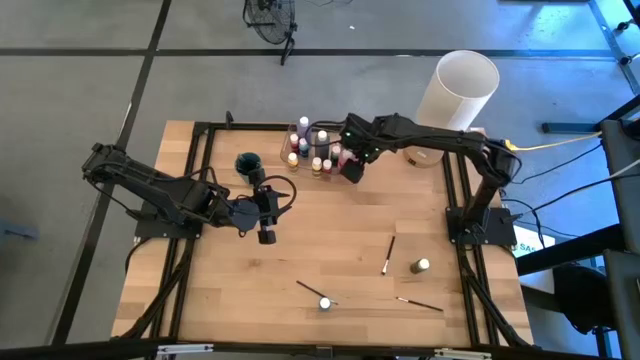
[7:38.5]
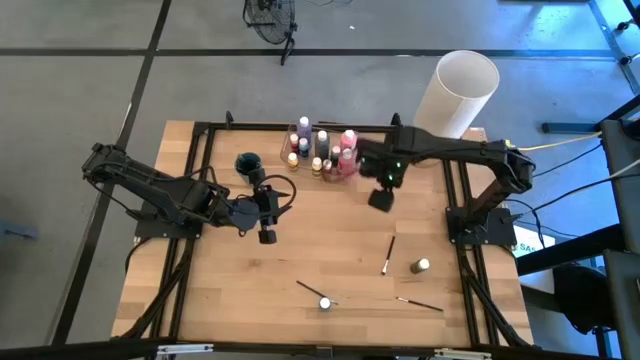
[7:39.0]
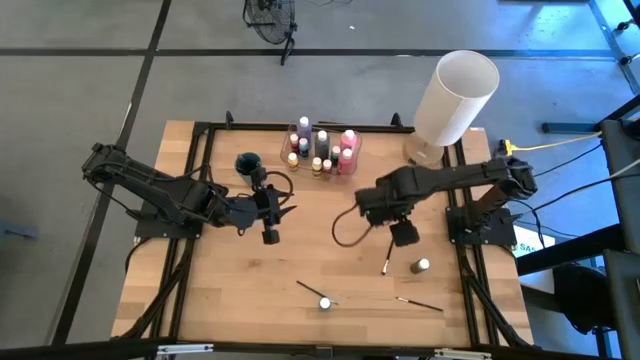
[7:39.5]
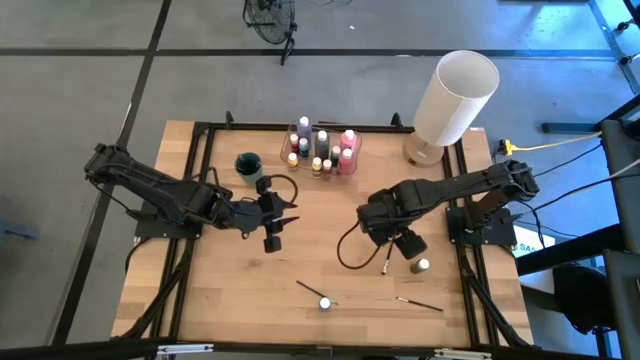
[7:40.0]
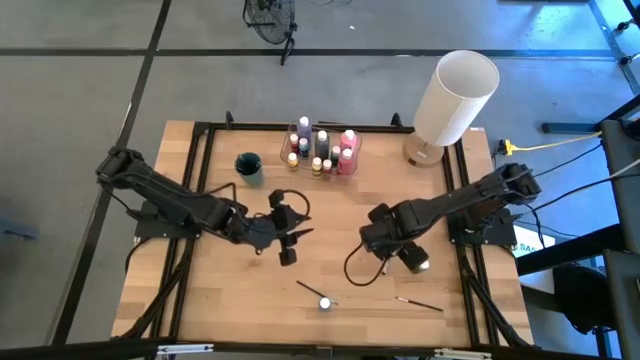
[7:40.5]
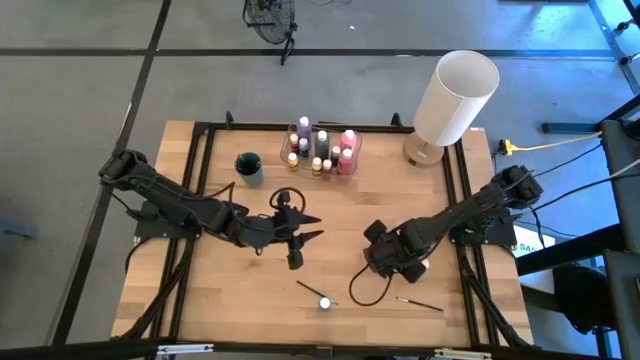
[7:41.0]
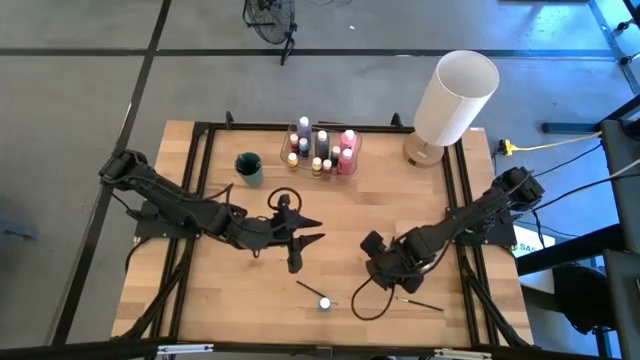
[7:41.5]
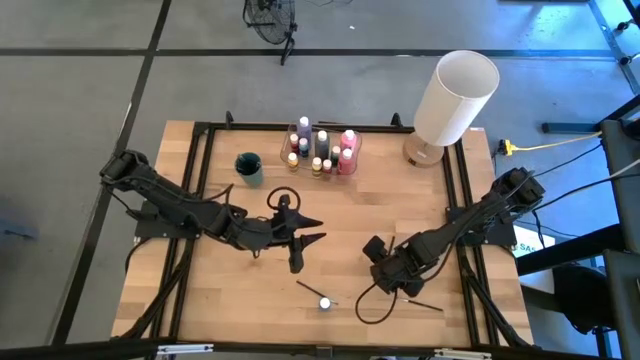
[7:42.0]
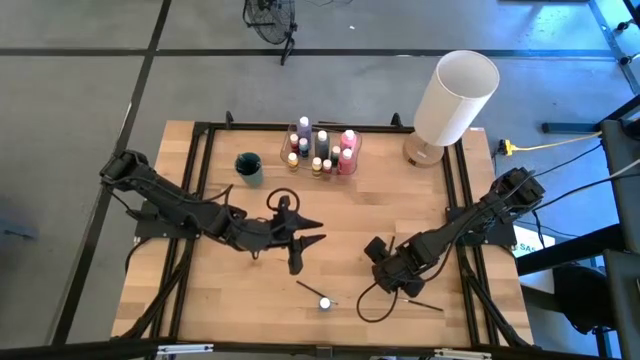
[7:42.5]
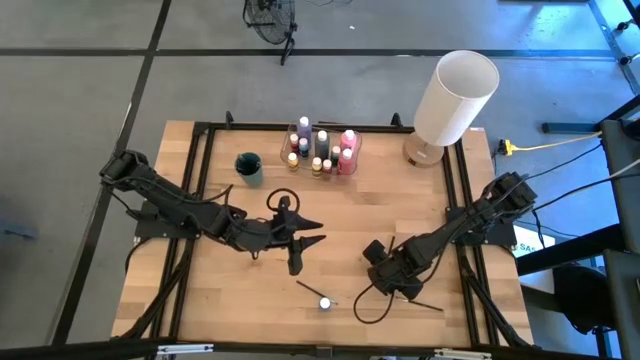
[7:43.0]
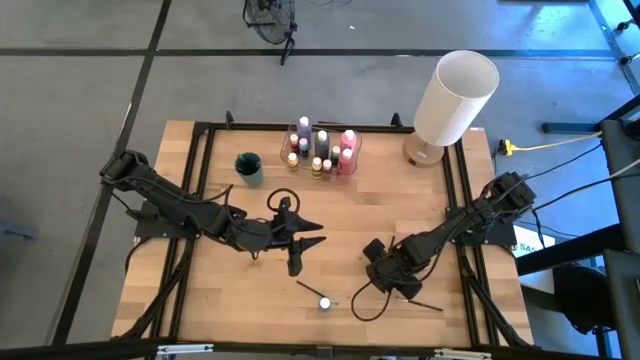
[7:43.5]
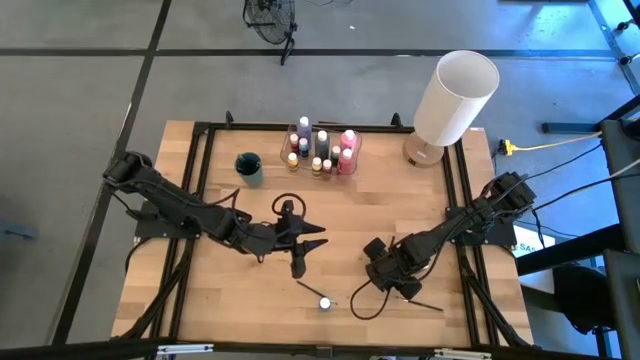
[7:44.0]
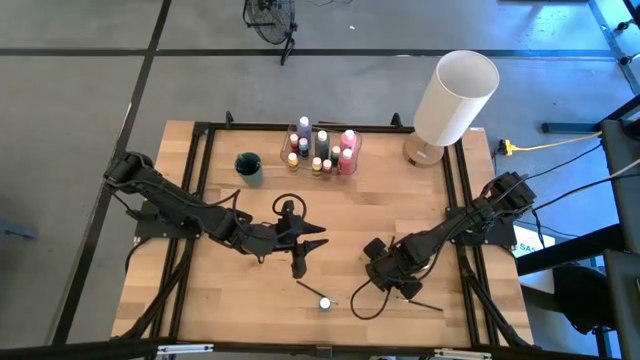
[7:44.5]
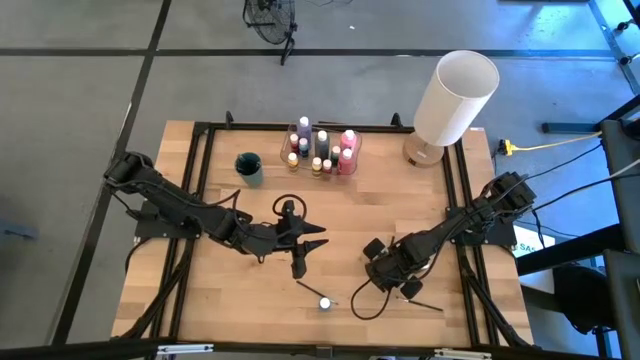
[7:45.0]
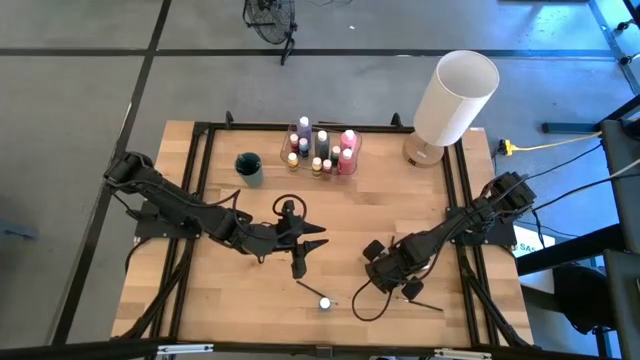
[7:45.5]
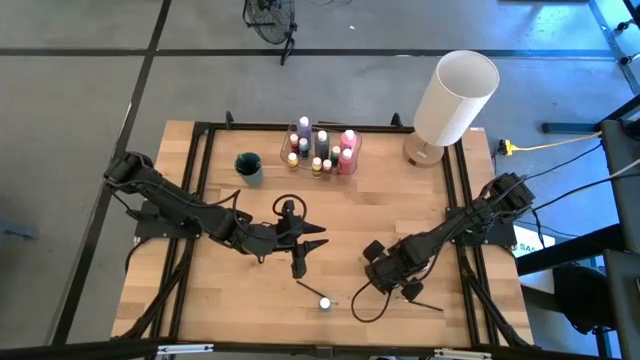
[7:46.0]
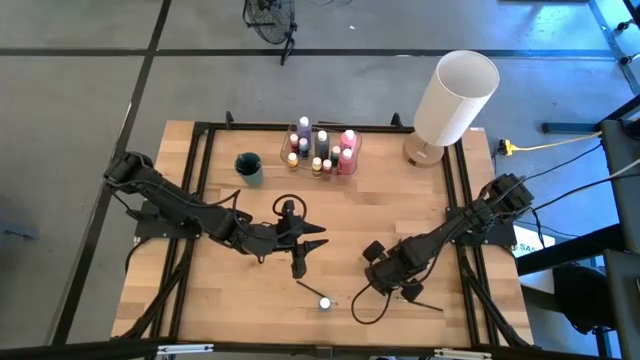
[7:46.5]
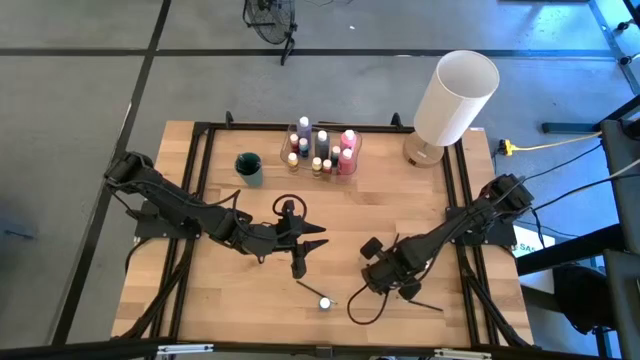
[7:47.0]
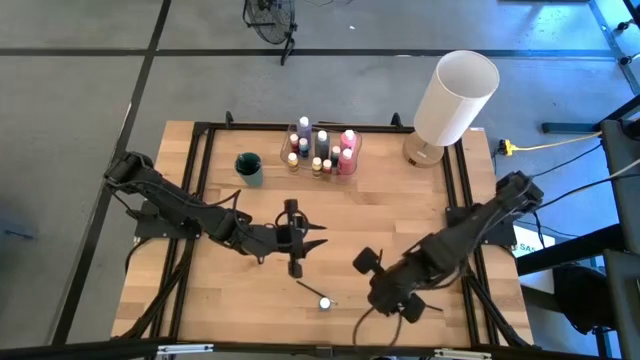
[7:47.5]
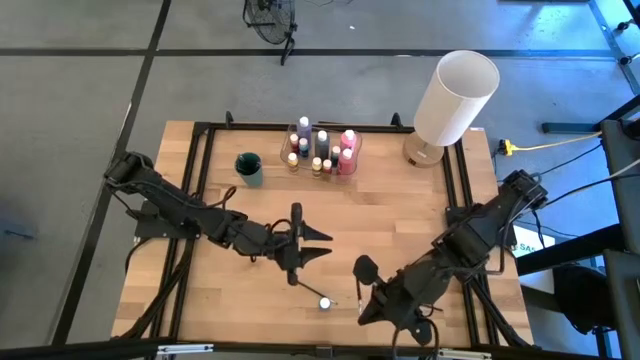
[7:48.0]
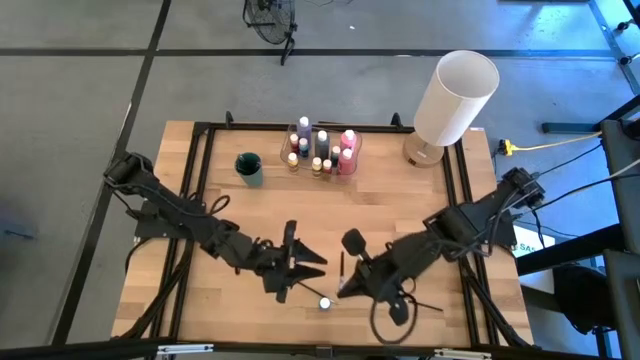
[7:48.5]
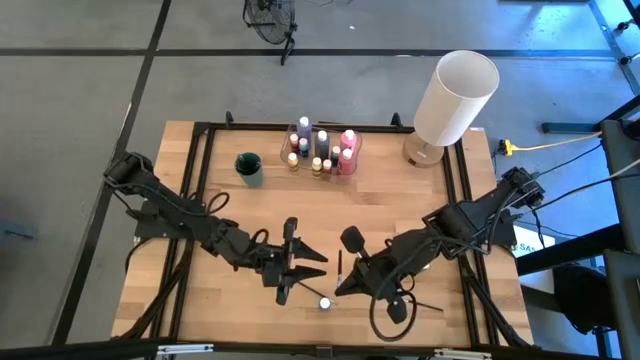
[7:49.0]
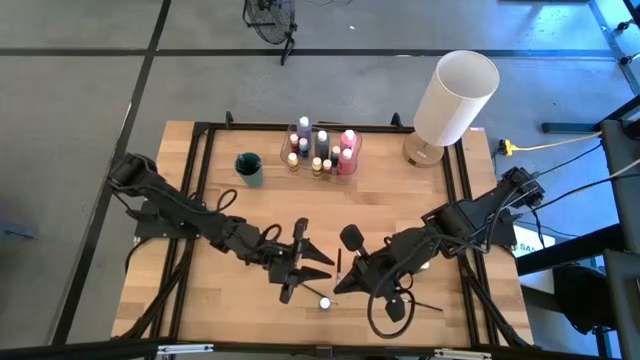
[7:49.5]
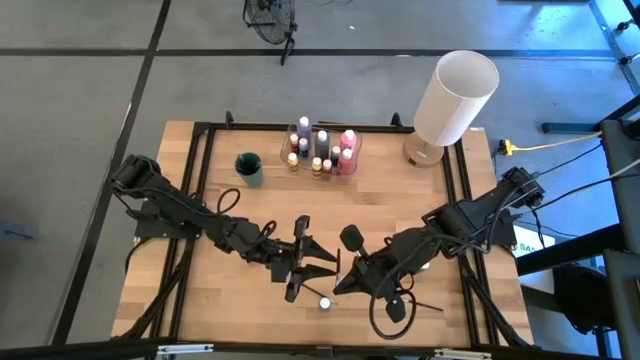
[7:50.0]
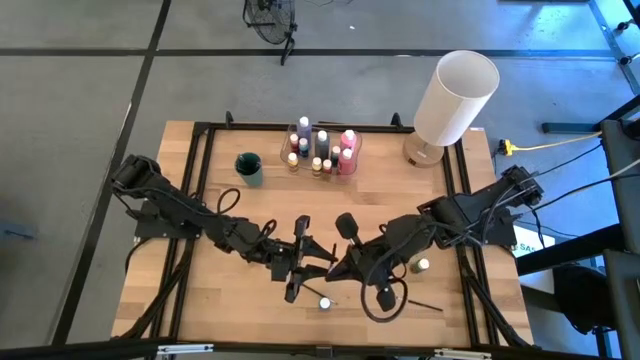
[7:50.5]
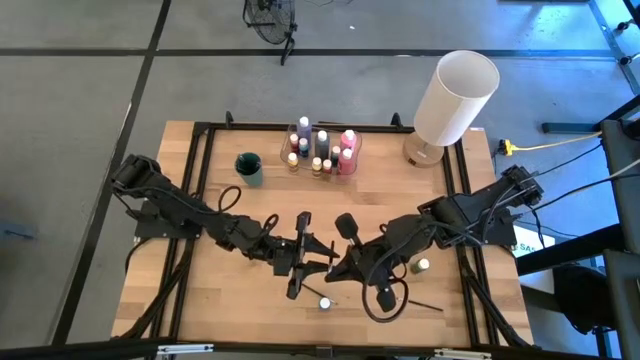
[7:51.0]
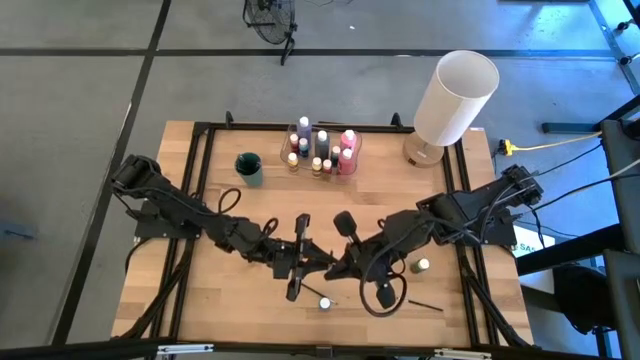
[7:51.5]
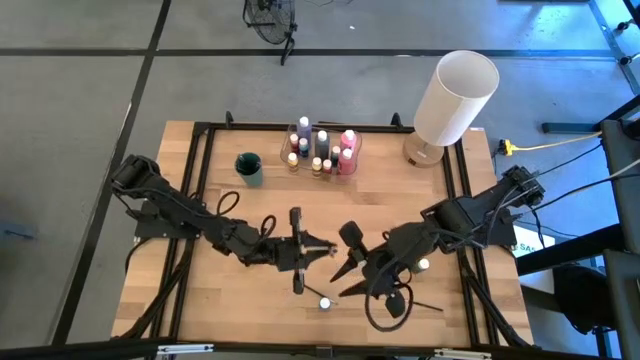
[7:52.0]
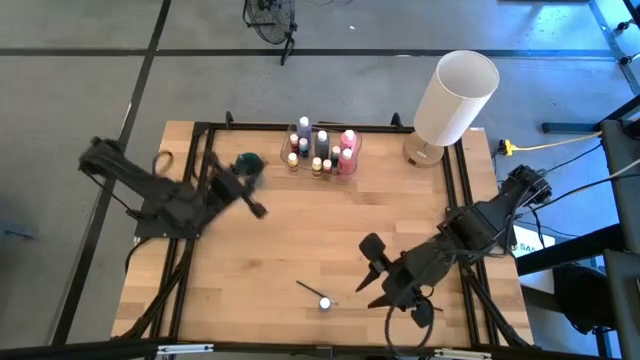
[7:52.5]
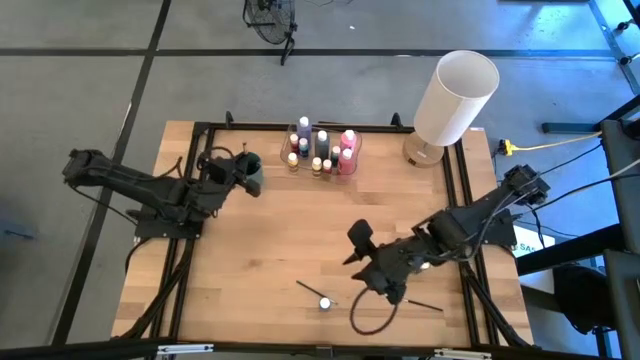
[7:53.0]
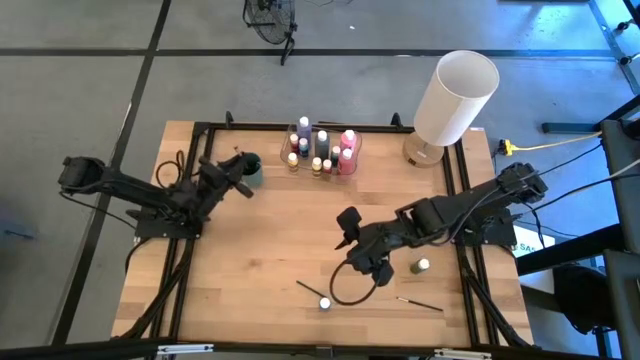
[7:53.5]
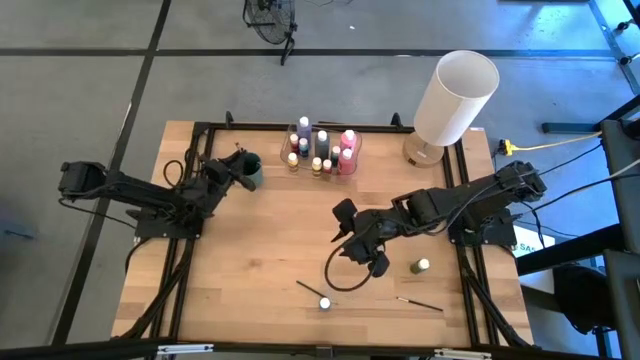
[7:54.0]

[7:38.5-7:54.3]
Task: Pick & Place Paint Supplies
Put the silver paint brush into the green cup

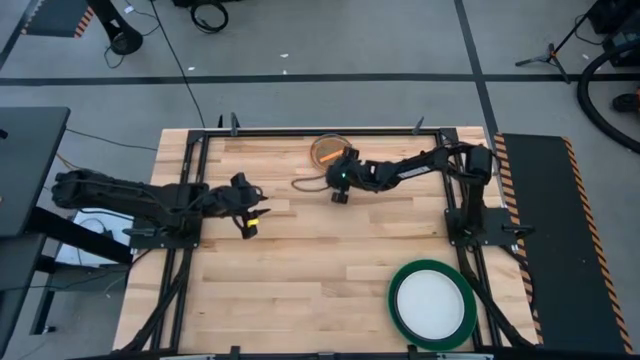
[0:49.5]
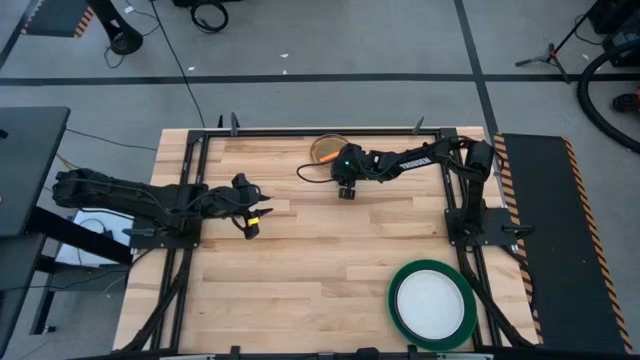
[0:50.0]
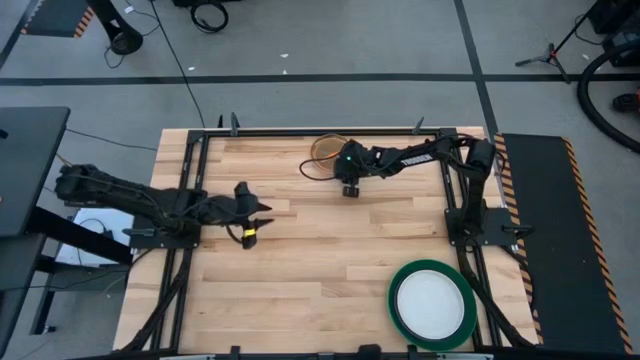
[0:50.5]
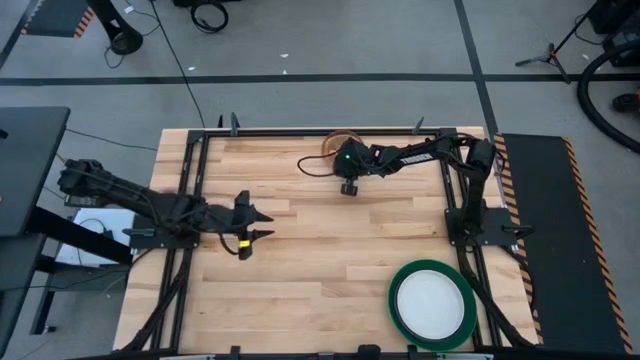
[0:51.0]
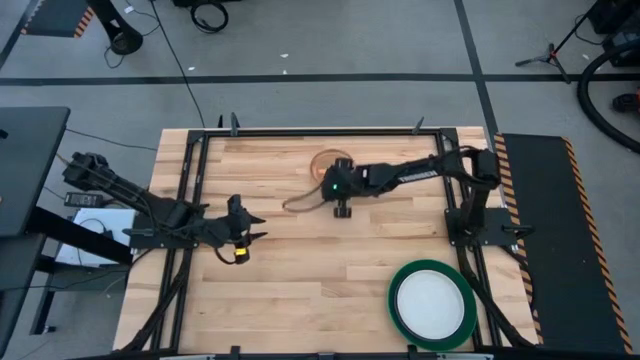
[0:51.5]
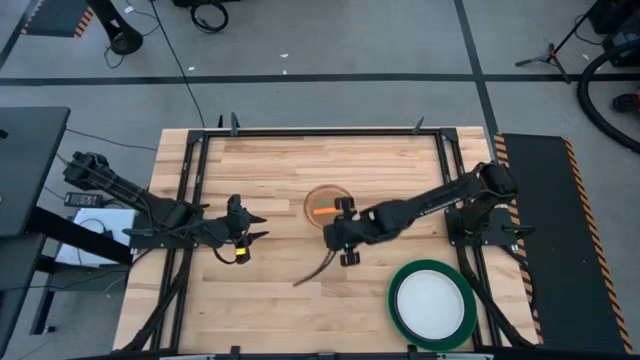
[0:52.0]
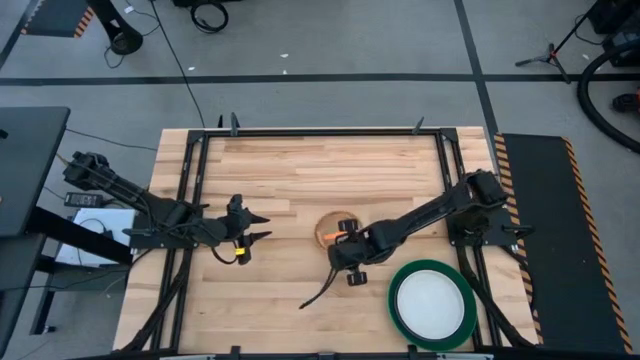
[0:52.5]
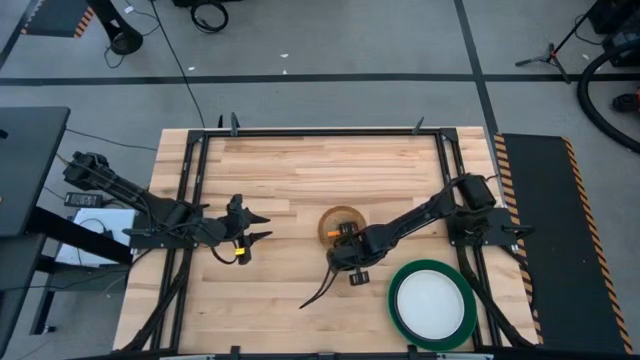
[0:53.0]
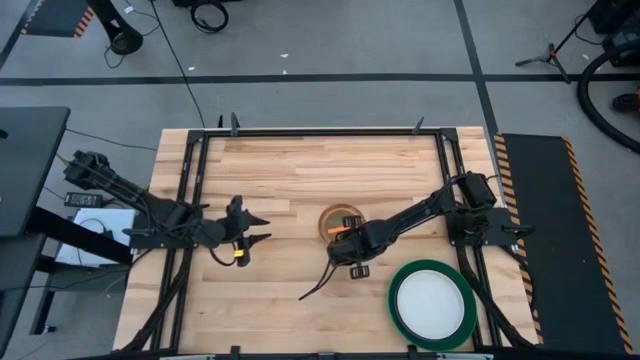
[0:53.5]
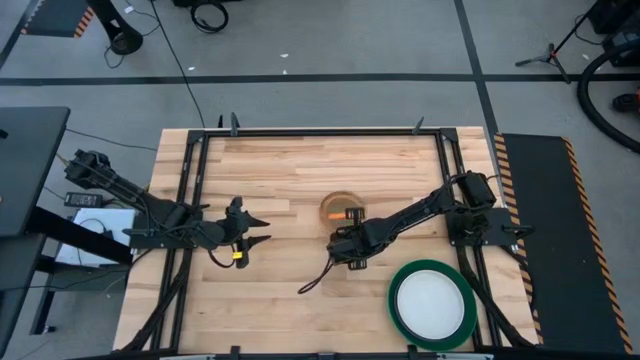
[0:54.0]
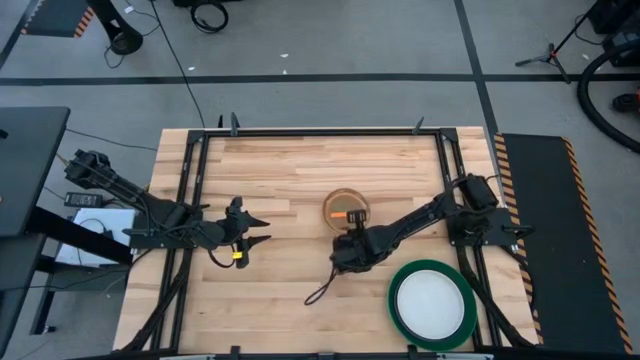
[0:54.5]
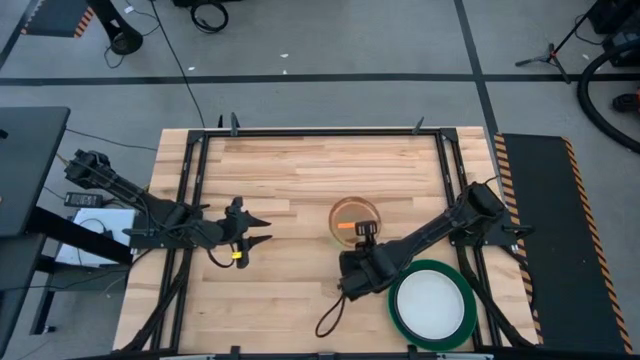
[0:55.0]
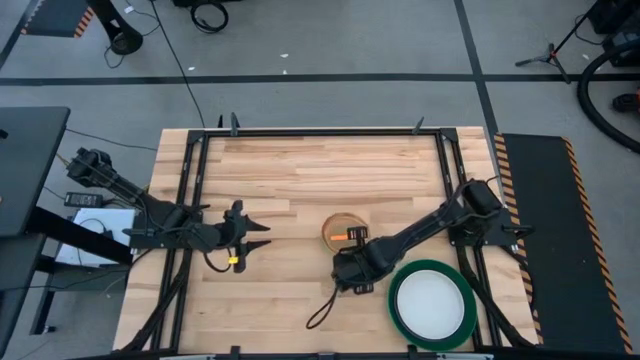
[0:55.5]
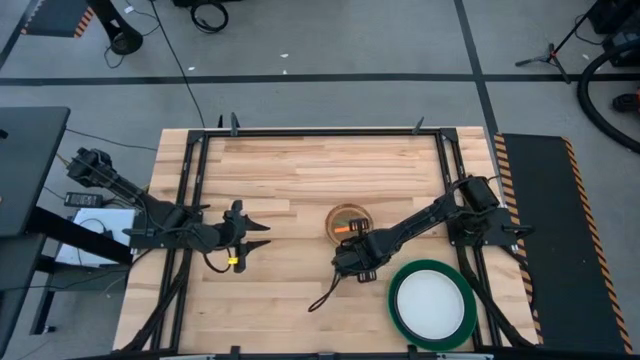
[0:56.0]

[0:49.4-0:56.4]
Task: Stack plastic plates
Stack the stacked transparent plates on top of the white plate
